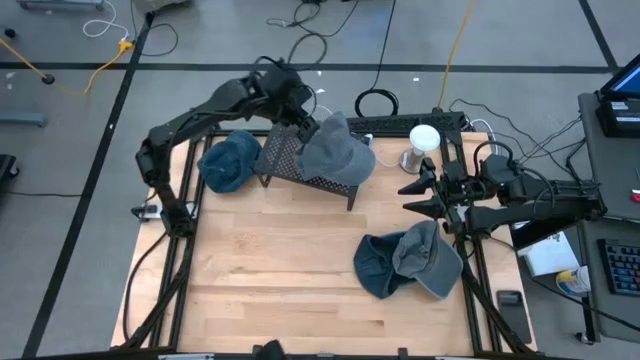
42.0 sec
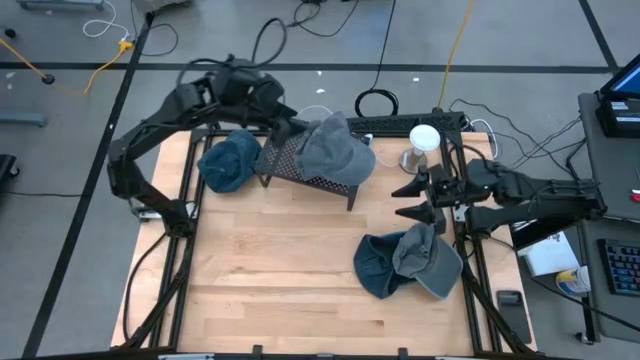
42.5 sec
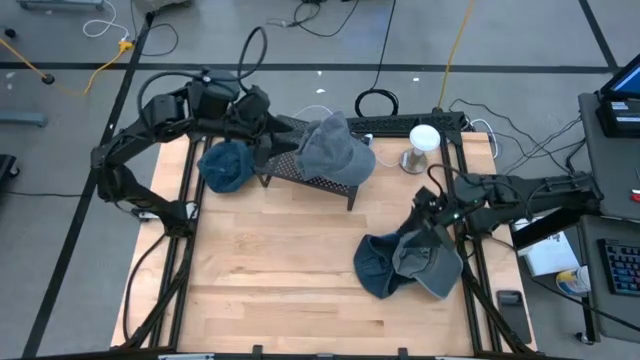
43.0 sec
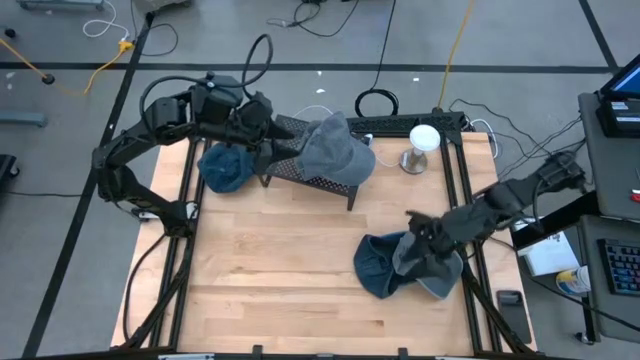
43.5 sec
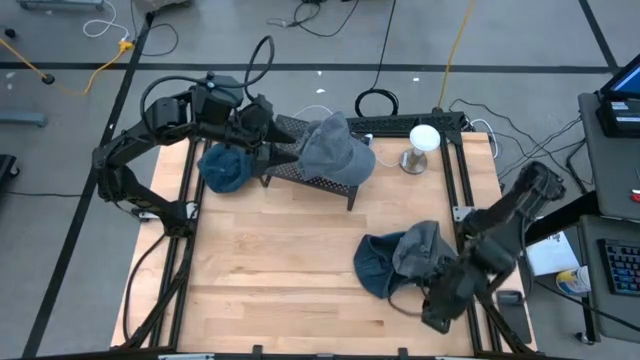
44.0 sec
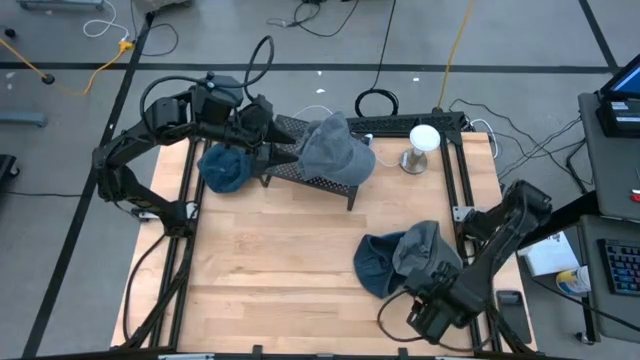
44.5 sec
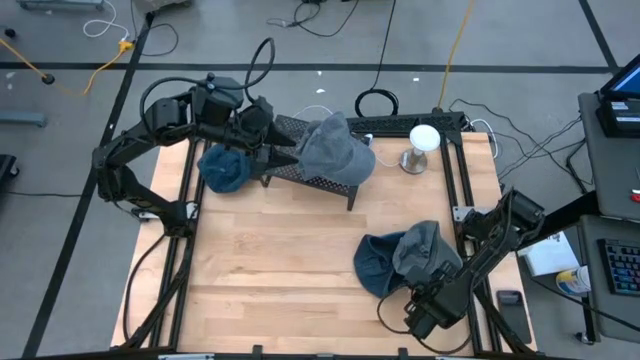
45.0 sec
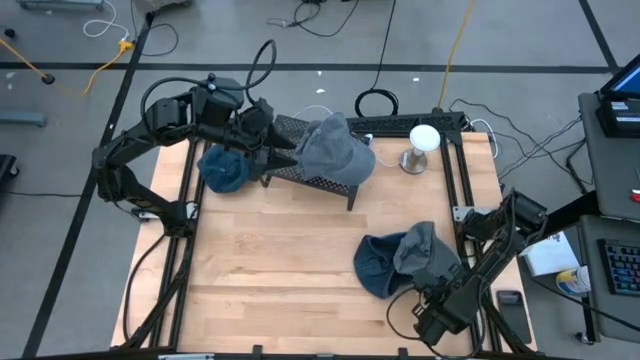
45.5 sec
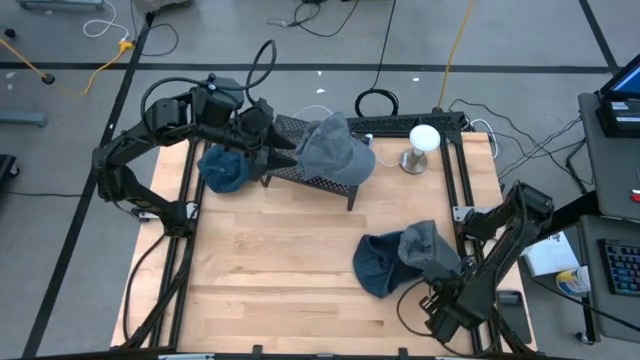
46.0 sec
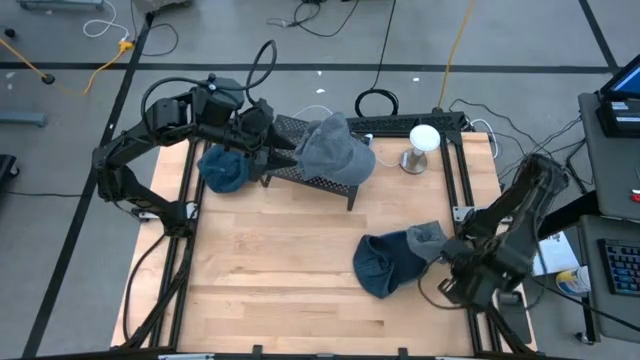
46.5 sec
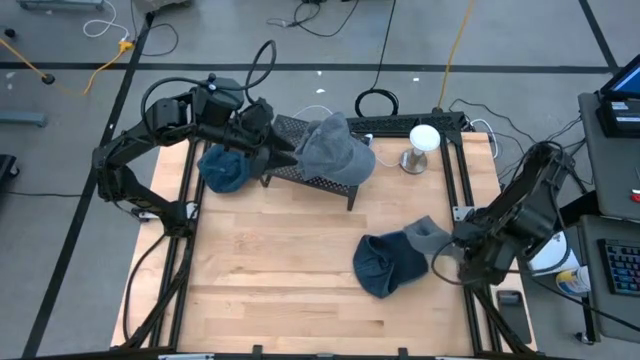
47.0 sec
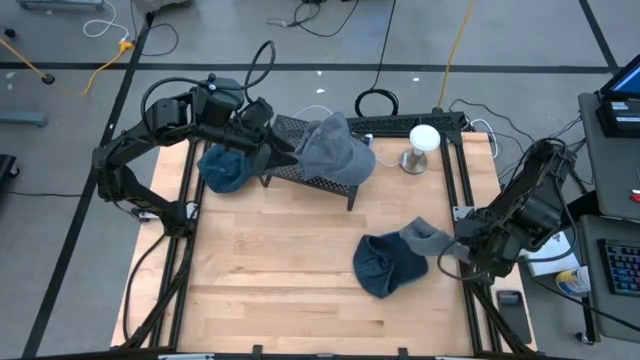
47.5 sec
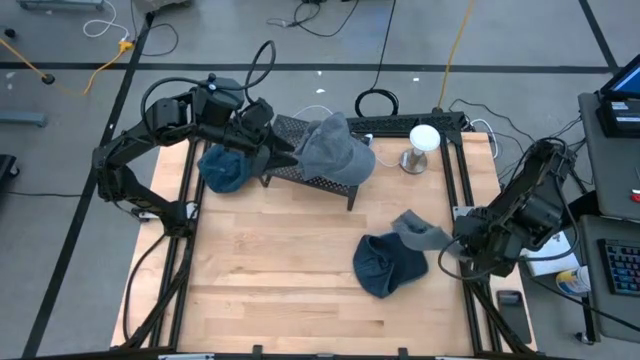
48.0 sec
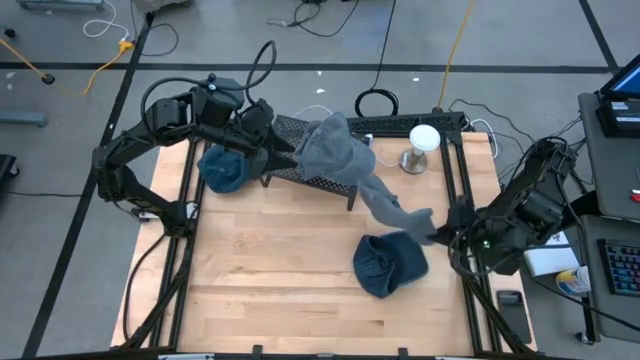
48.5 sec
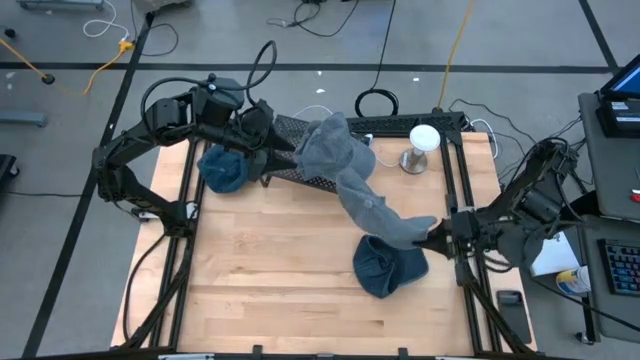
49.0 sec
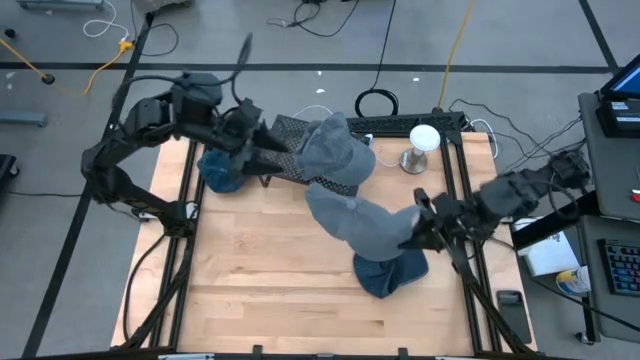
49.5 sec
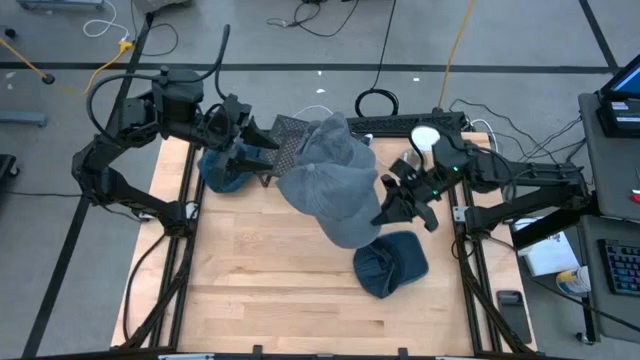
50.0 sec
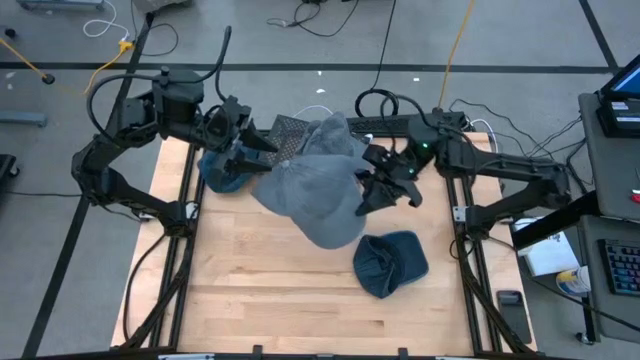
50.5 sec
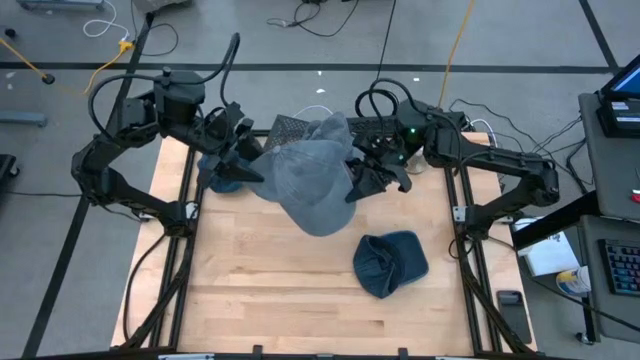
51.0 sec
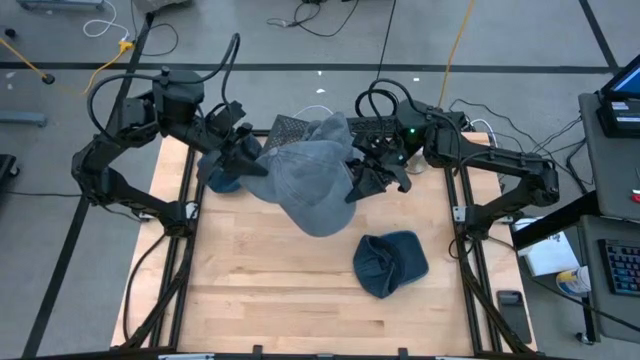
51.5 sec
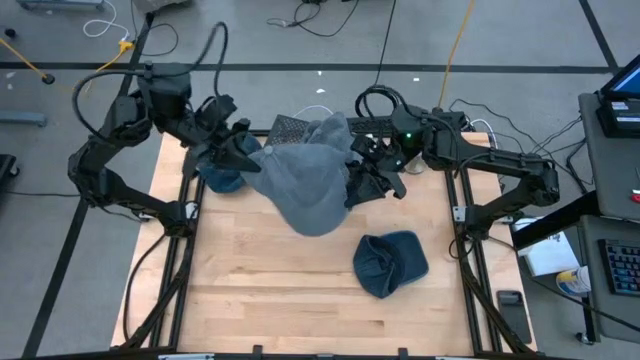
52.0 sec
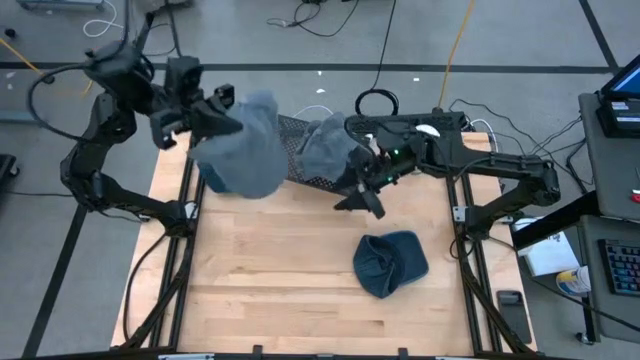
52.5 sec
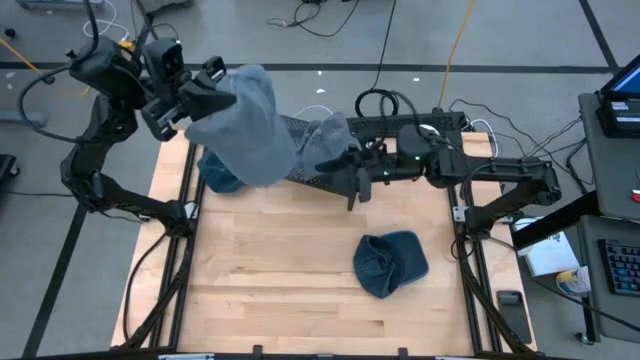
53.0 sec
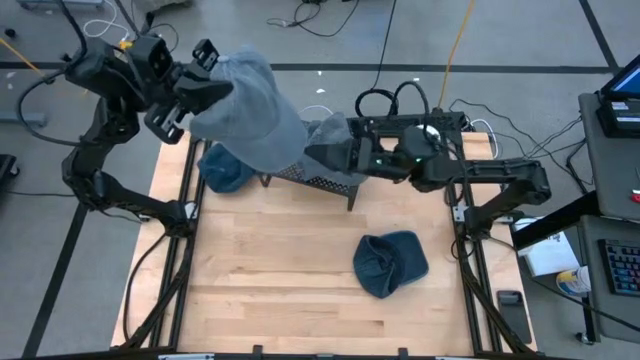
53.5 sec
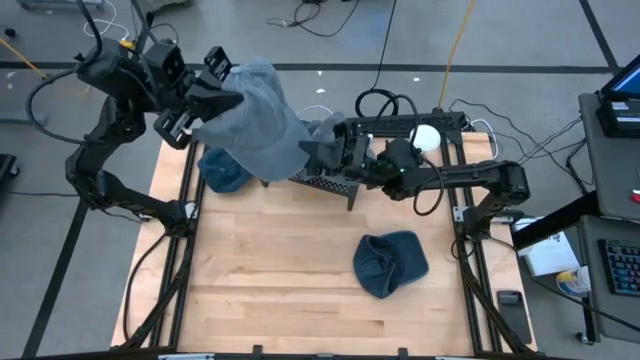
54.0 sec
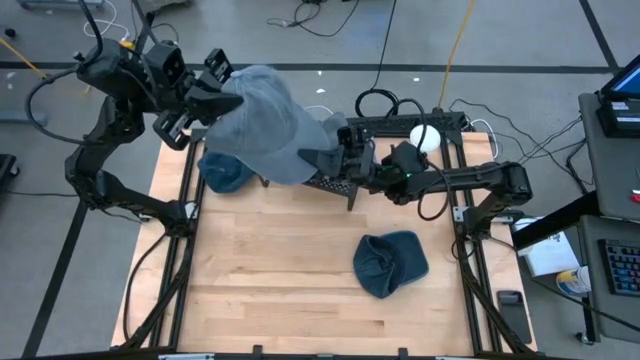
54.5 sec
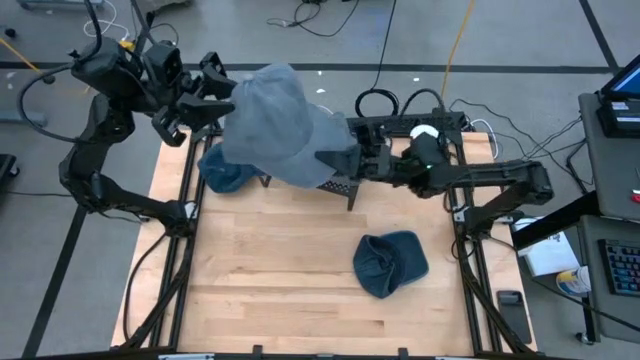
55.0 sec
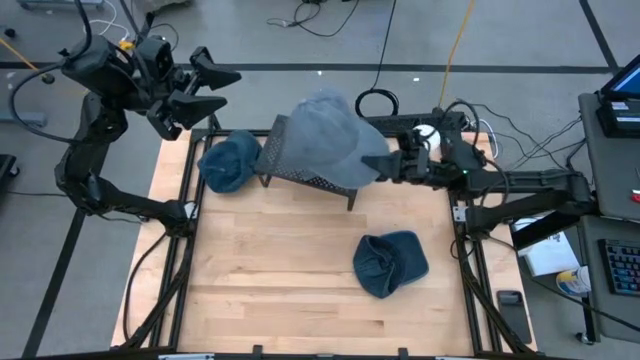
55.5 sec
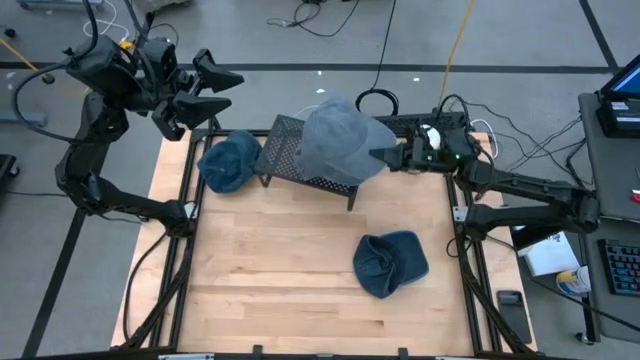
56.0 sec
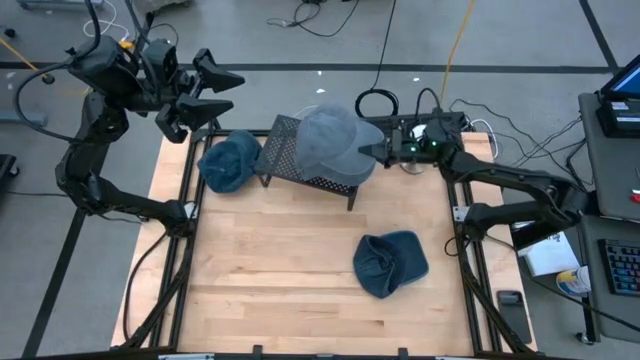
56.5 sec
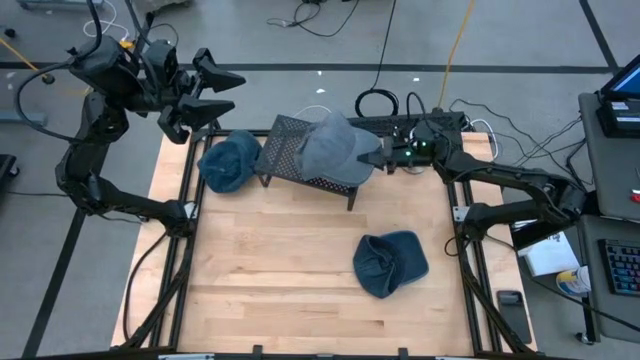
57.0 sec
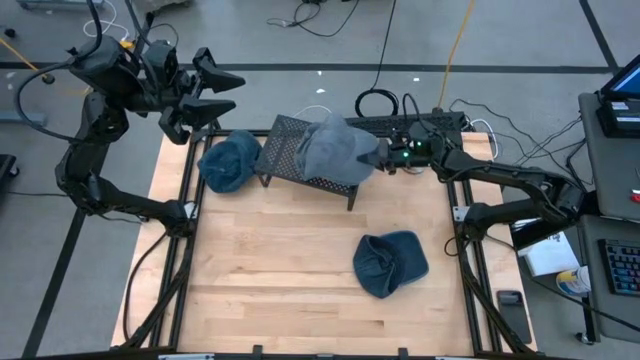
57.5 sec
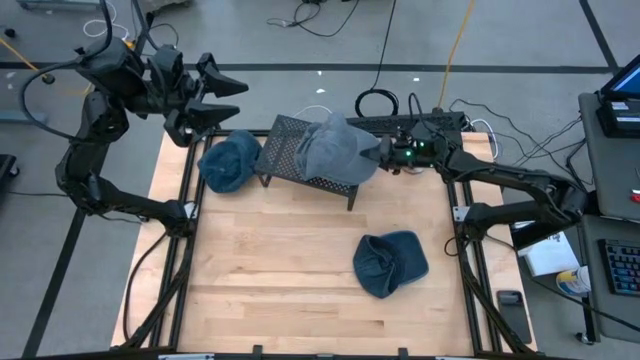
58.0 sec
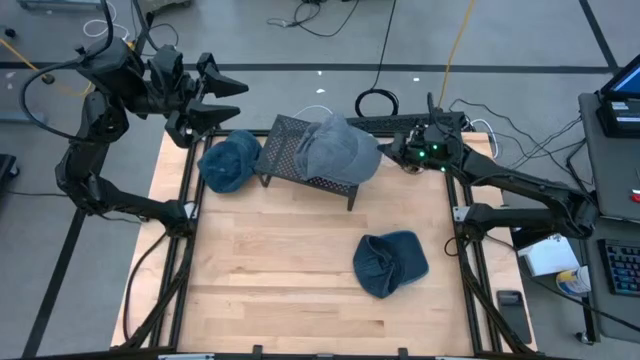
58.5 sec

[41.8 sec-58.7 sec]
Task: Pick & Place hat
Stack the gray cap on the stacked gray cap on the shelf
